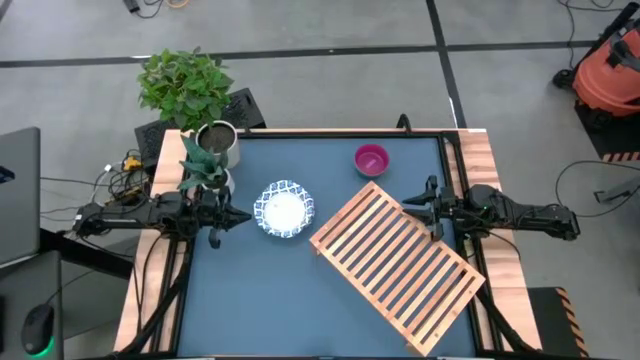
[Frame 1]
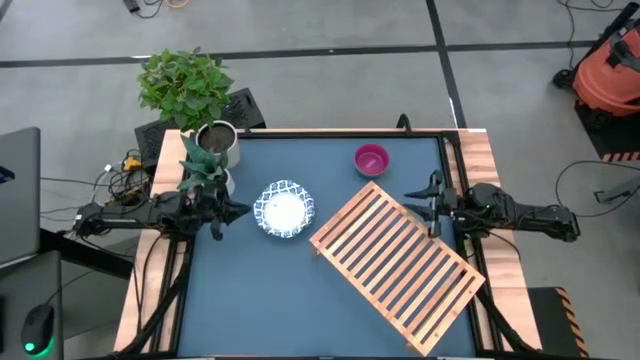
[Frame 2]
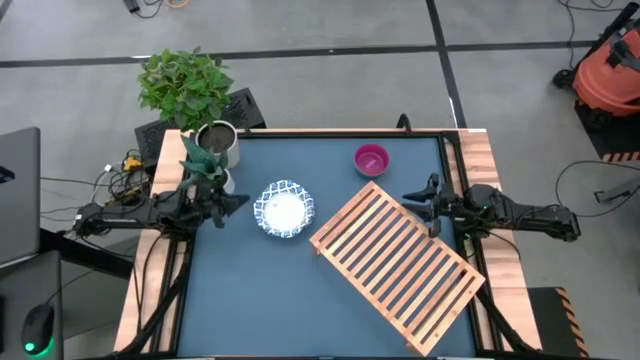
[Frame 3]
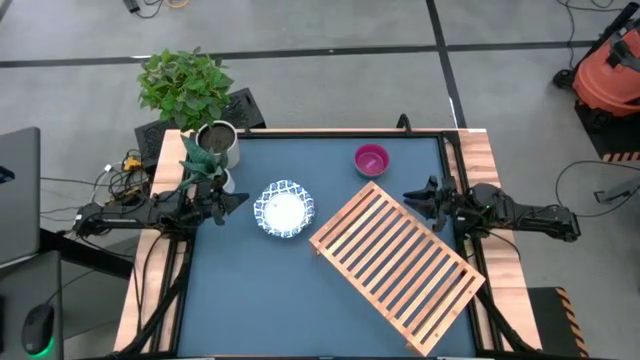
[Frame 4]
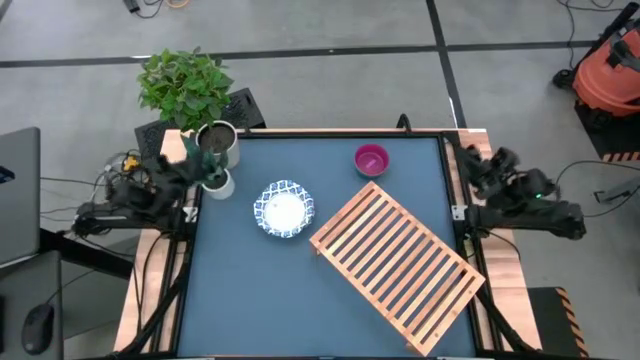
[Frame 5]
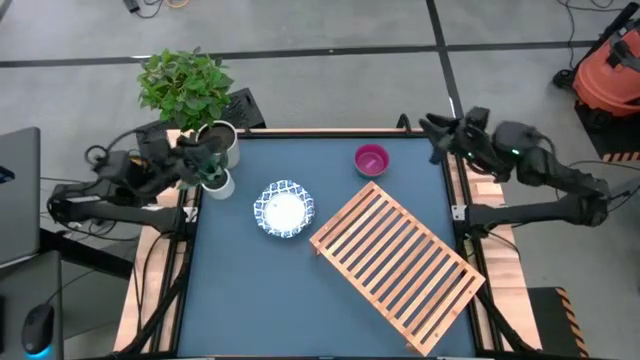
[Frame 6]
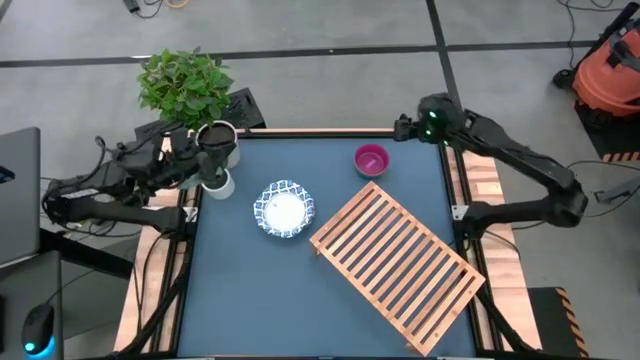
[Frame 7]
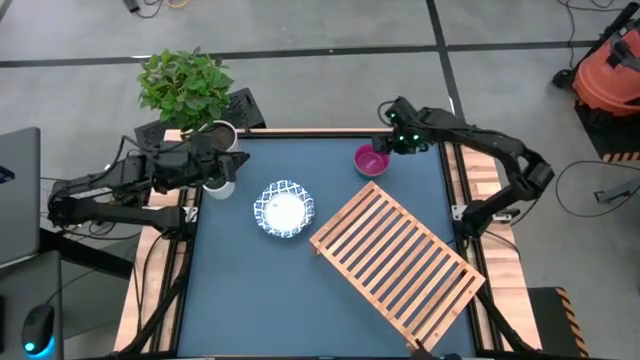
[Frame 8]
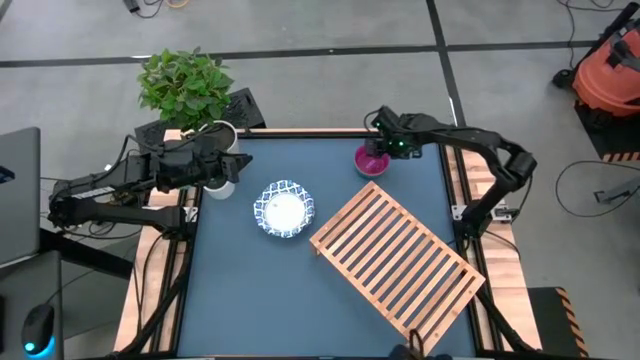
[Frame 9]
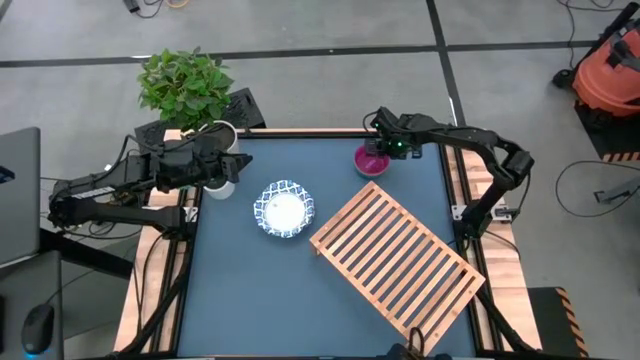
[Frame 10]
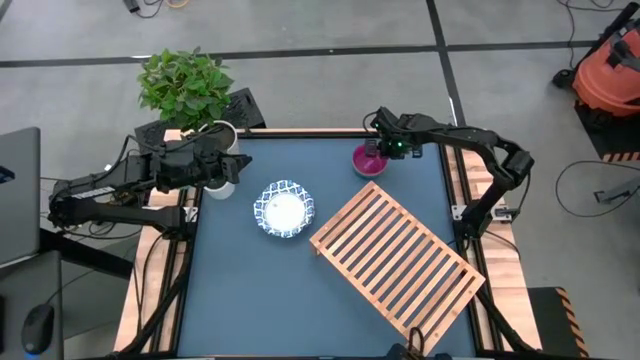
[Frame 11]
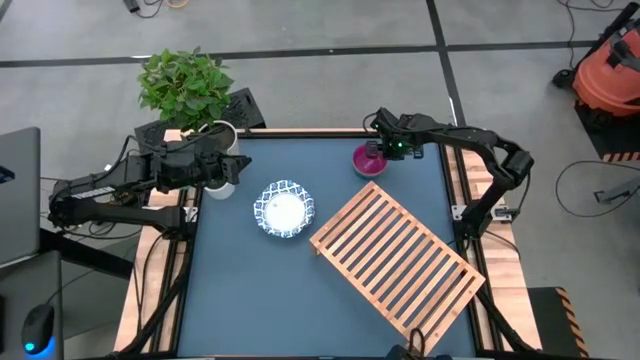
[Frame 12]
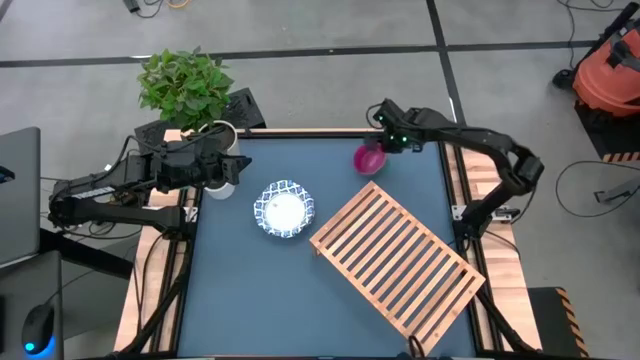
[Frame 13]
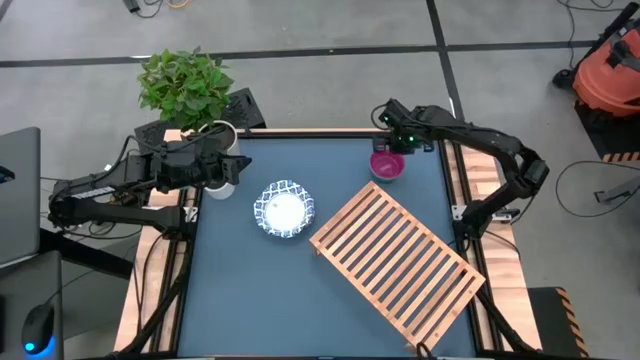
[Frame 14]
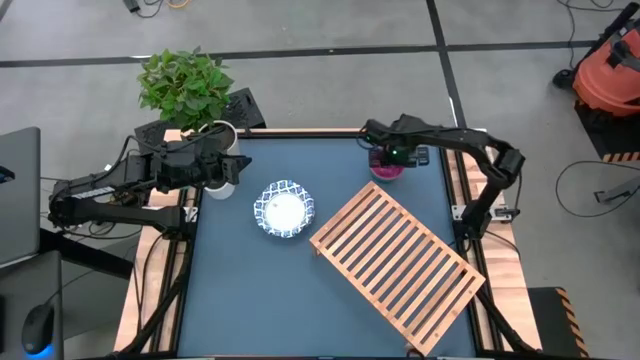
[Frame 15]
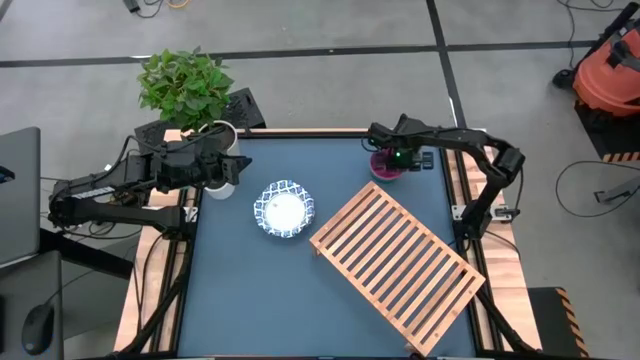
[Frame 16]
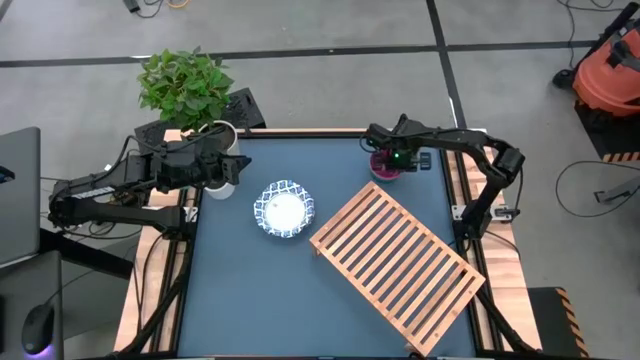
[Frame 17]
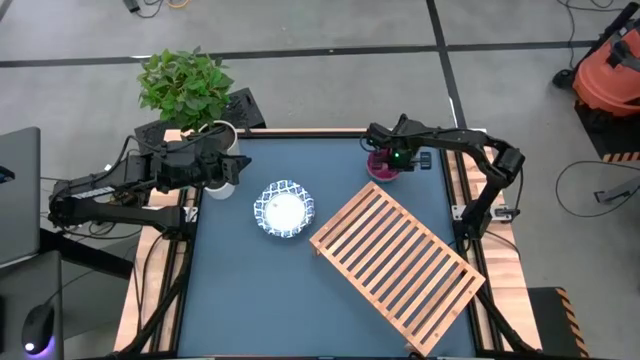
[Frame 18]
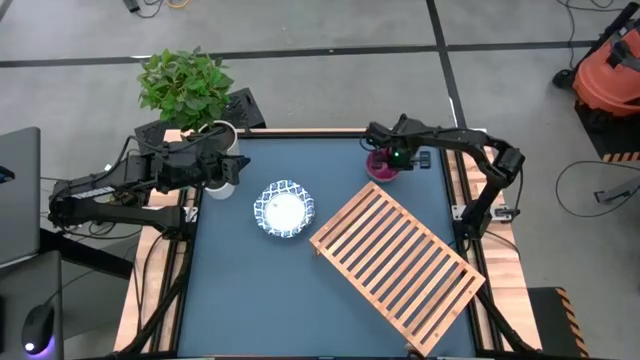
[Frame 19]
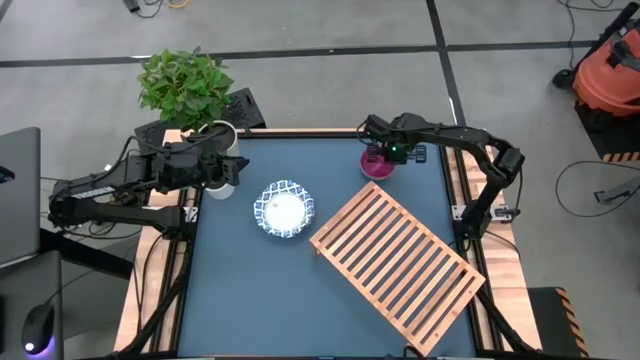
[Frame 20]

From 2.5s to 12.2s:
Task: Place and stack bowls onto a shelf
Put the small purple bowl on the shelf

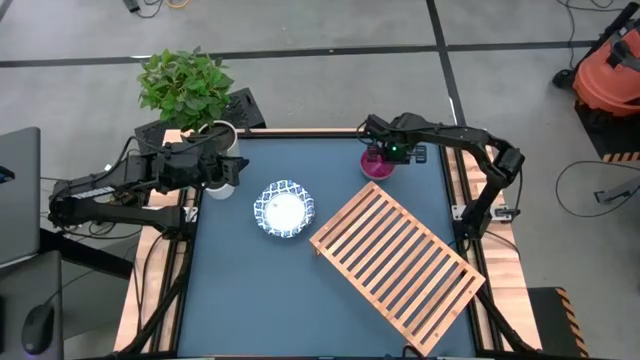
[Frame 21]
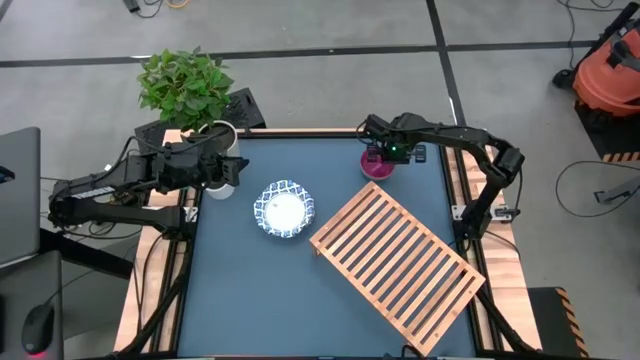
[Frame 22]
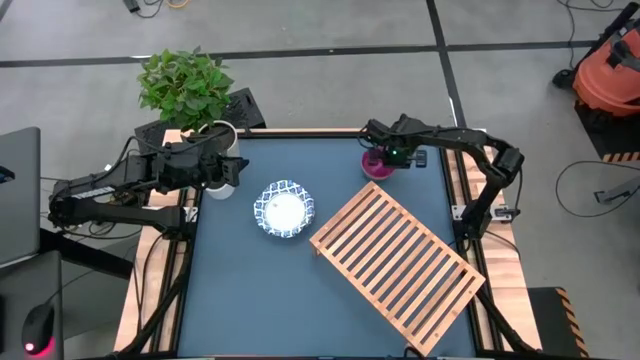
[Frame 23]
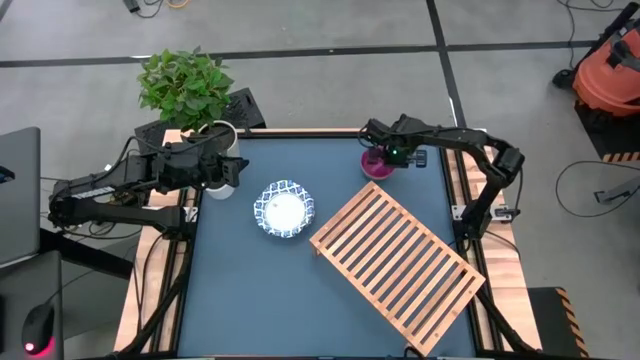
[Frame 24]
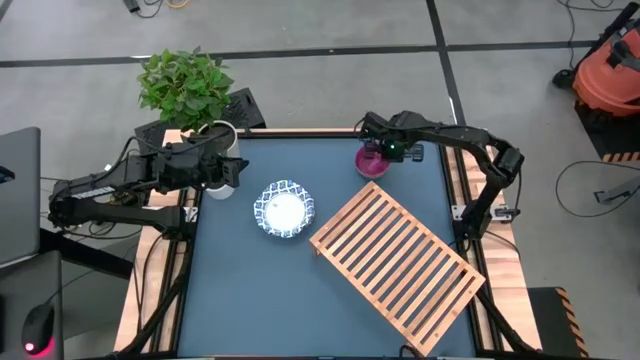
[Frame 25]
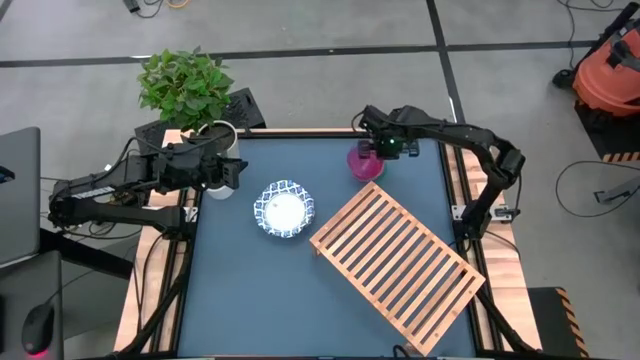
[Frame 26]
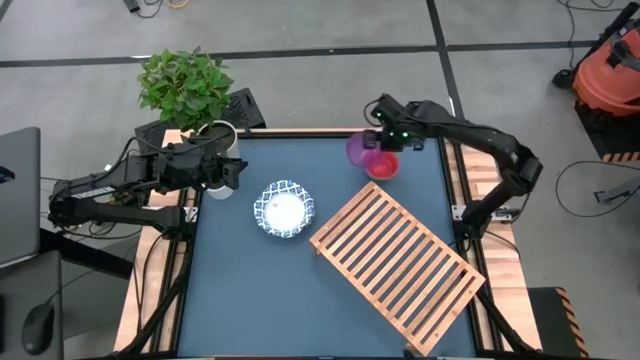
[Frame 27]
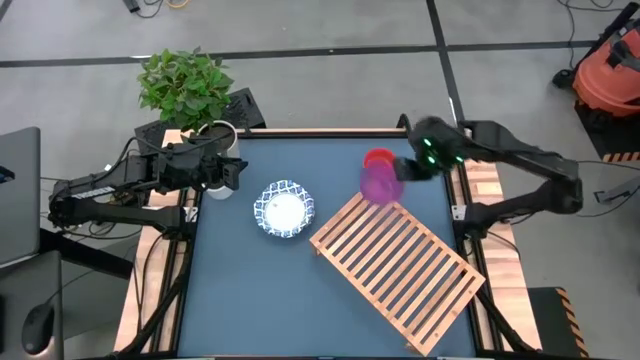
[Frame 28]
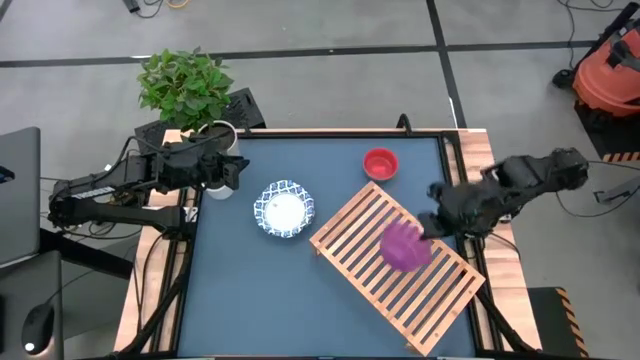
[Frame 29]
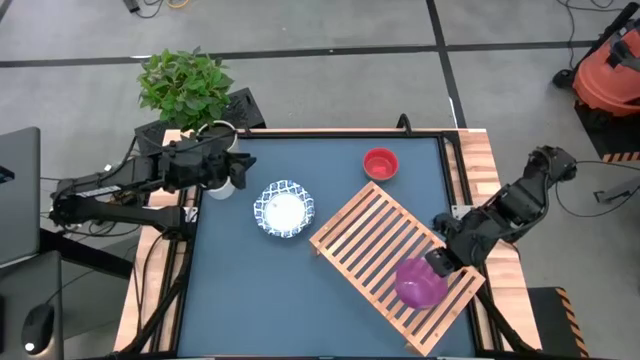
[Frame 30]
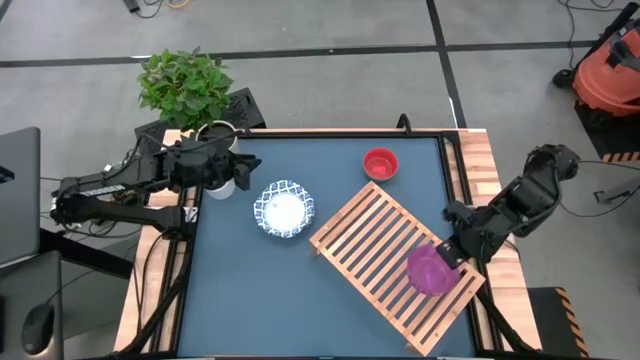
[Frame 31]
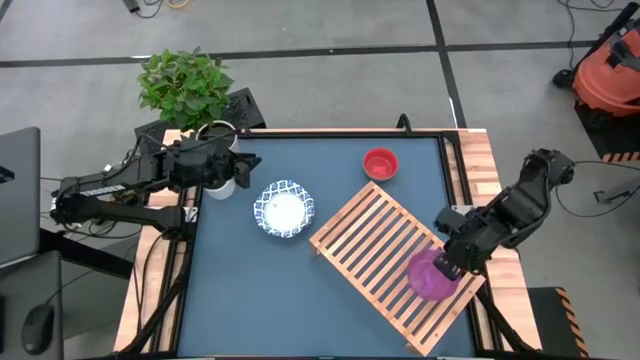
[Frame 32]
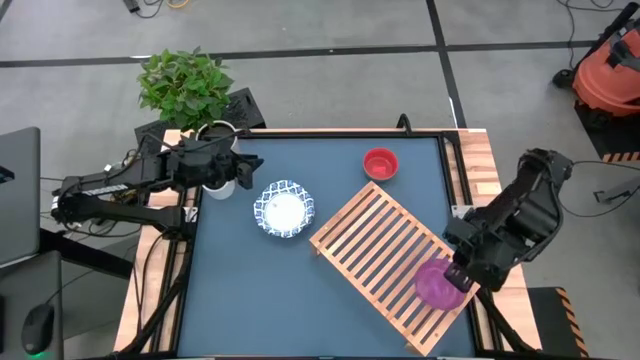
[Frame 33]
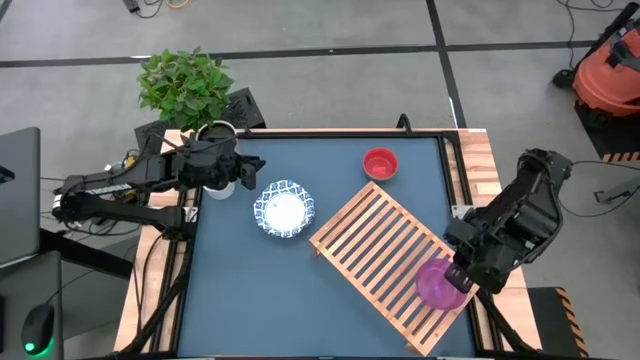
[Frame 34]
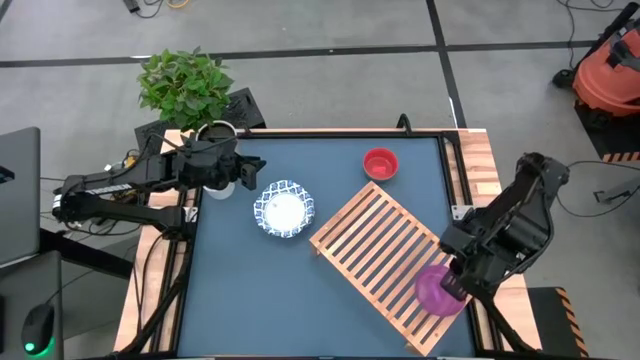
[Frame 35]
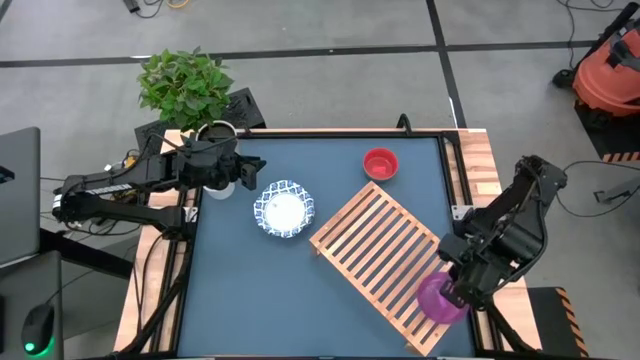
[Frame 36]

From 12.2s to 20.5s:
Put the small purple bowl on the shelf

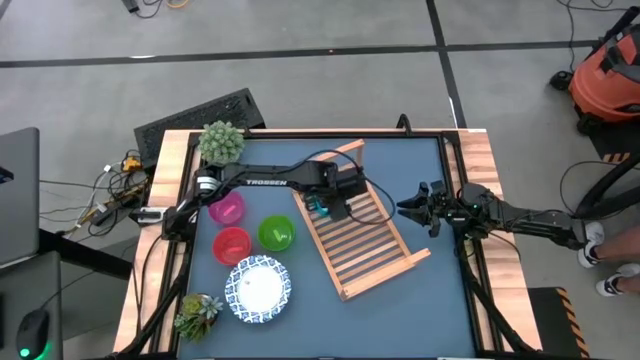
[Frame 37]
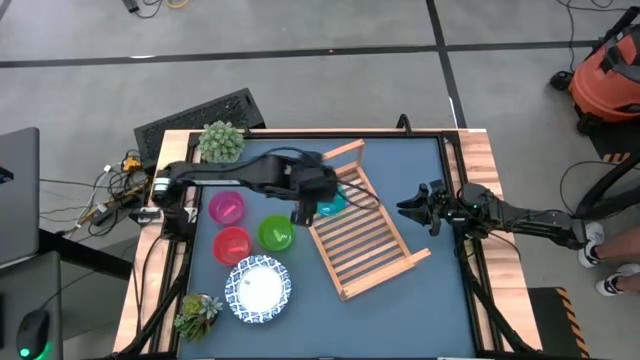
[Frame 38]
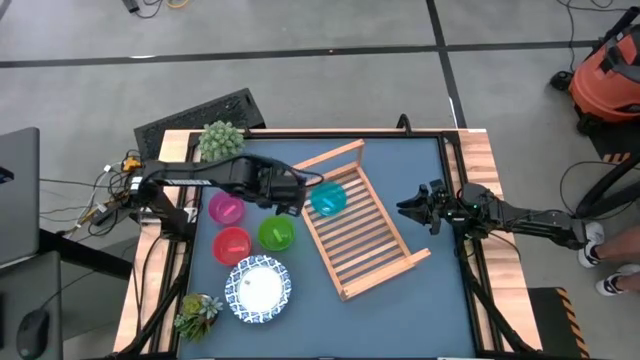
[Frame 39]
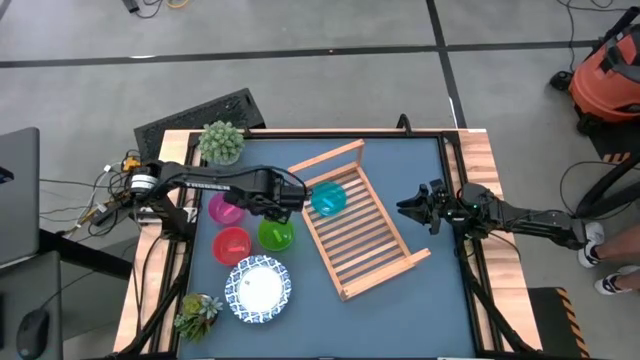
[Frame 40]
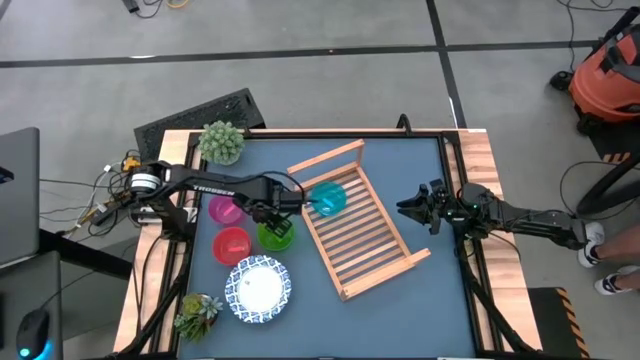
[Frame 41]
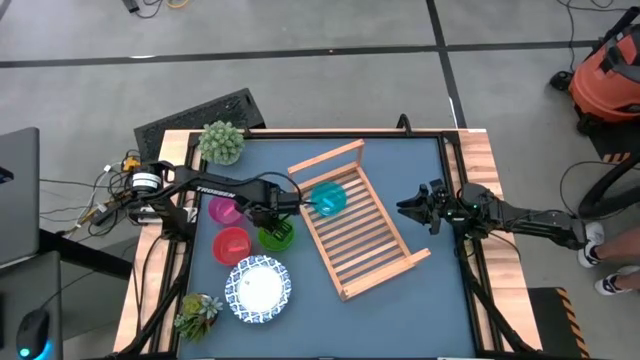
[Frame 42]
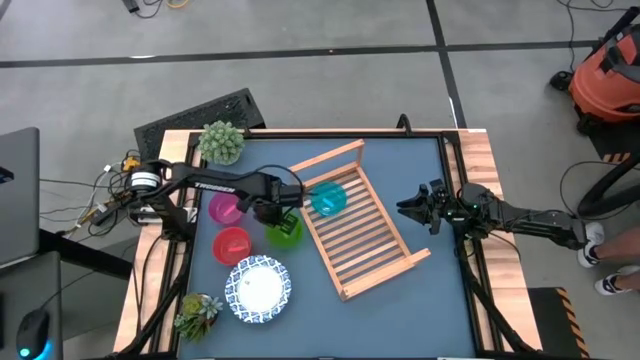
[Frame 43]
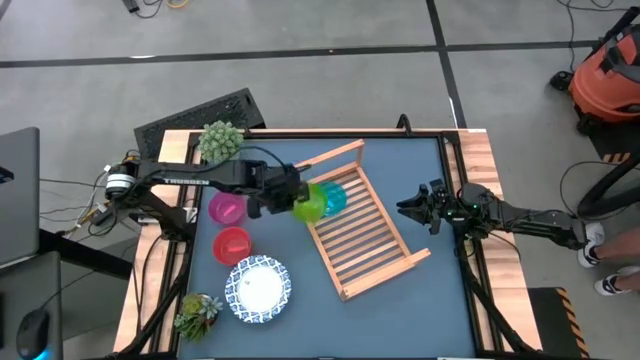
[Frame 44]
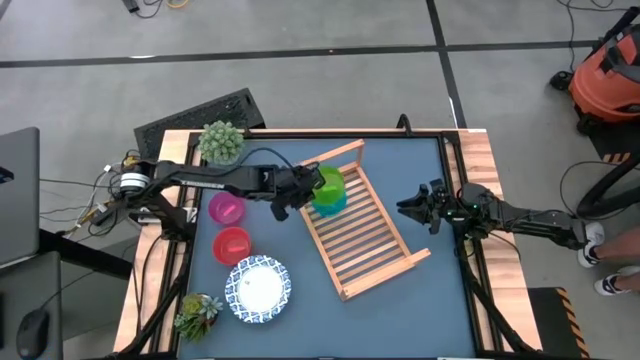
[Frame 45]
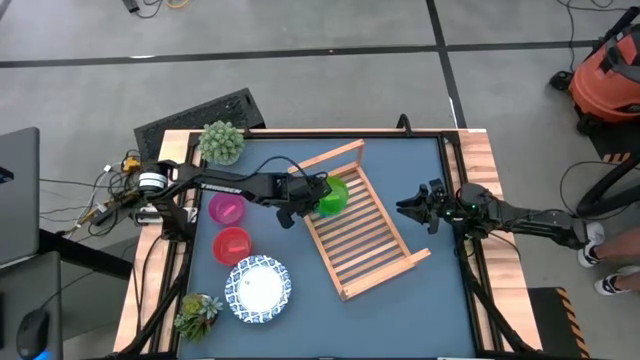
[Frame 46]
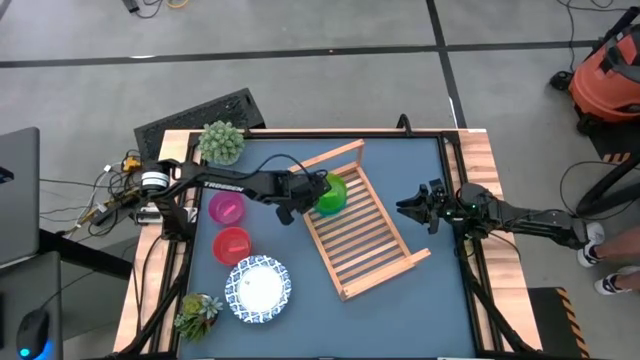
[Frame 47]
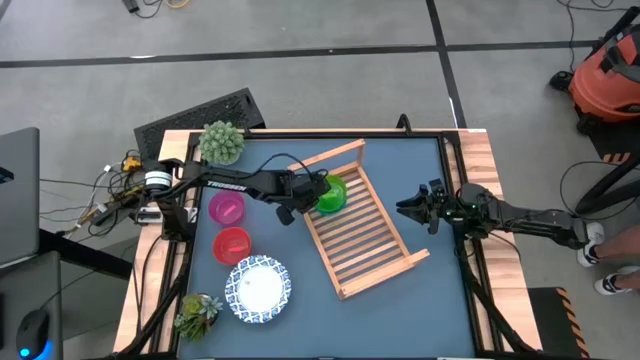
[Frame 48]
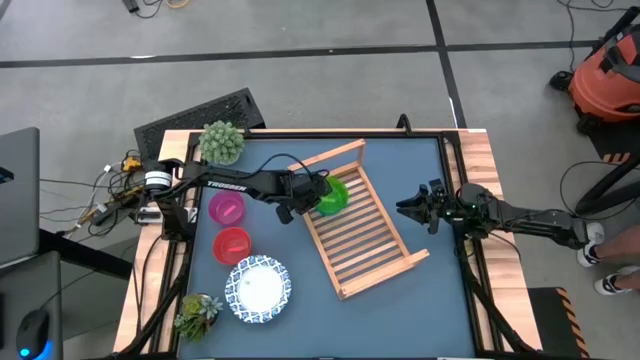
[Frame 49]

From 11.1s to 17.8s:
Task: Place and stack bowls onto a shelf
Stack the green bowl on top of the blue bowl
